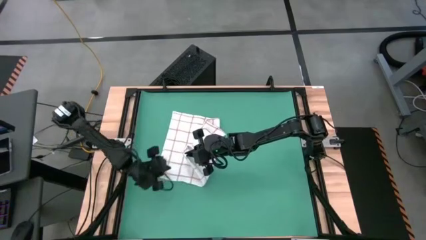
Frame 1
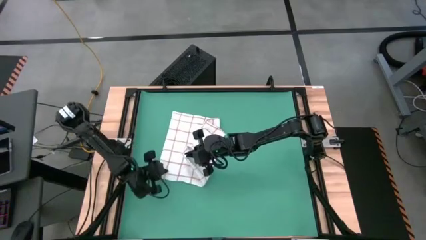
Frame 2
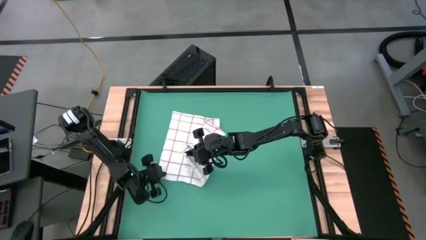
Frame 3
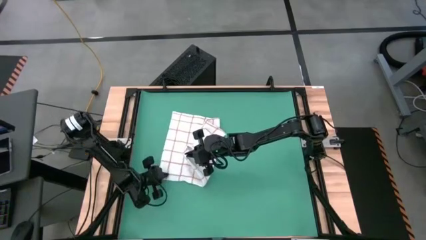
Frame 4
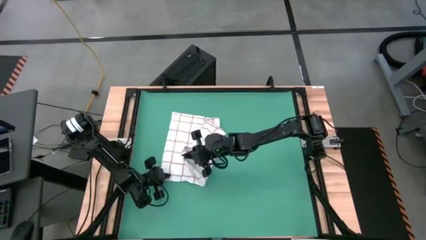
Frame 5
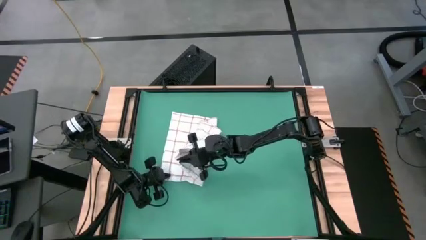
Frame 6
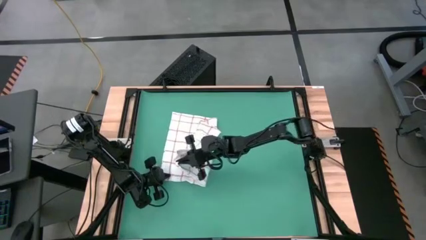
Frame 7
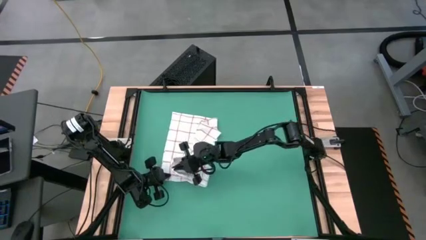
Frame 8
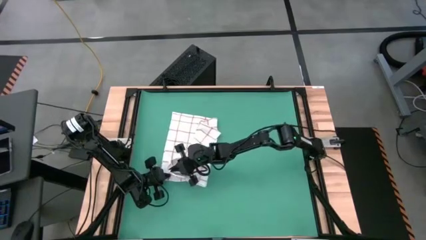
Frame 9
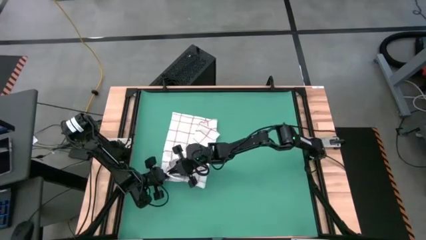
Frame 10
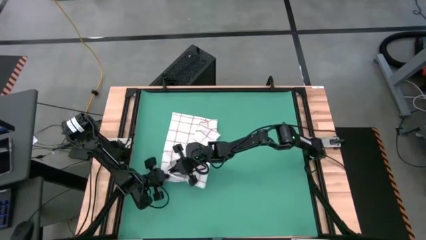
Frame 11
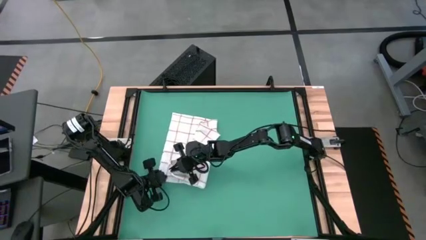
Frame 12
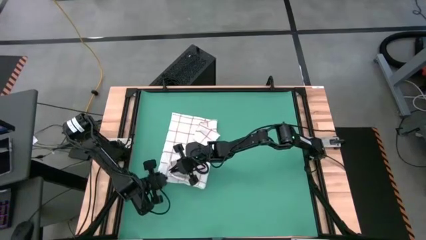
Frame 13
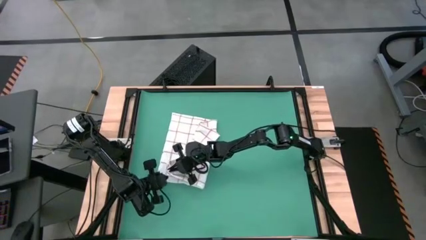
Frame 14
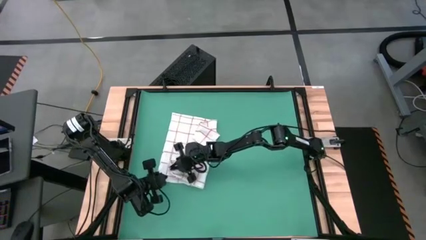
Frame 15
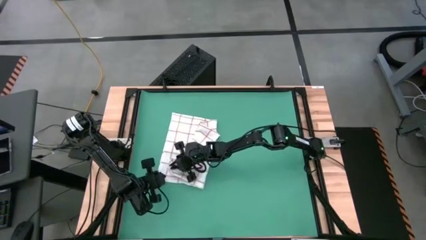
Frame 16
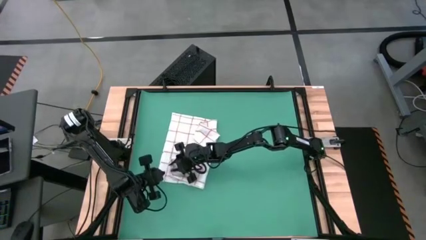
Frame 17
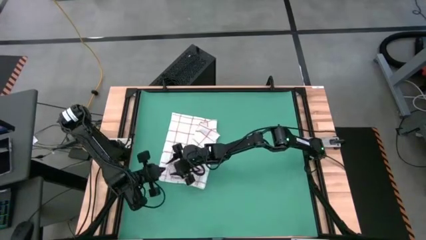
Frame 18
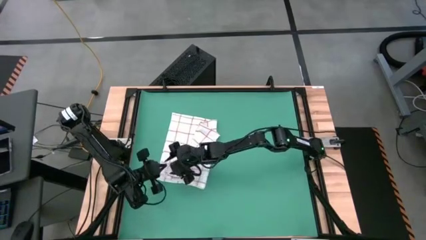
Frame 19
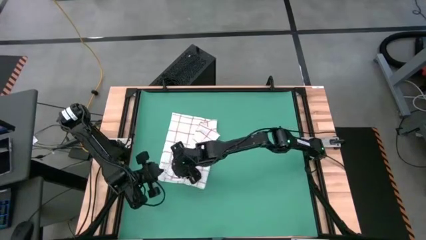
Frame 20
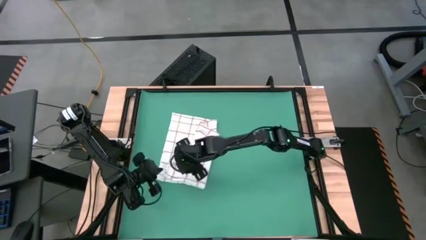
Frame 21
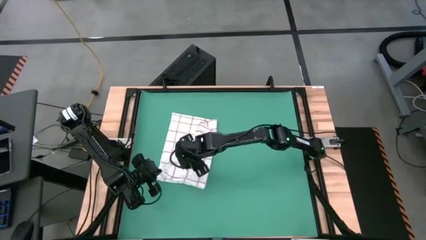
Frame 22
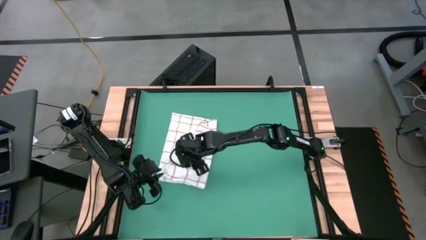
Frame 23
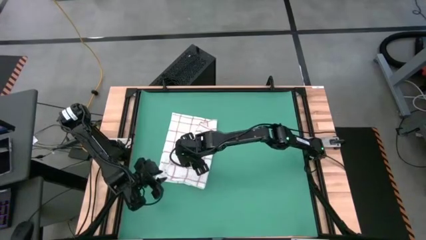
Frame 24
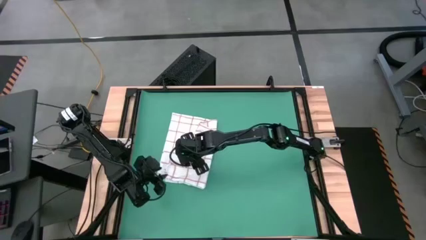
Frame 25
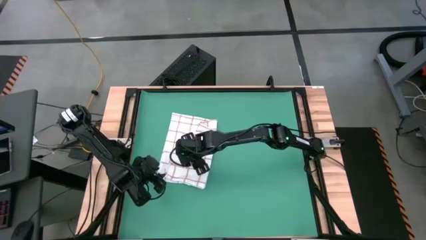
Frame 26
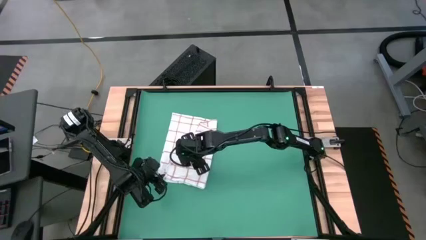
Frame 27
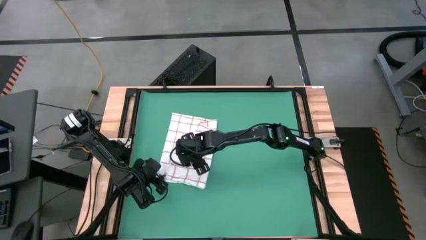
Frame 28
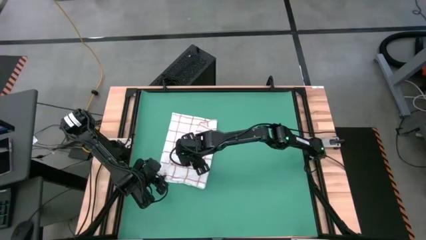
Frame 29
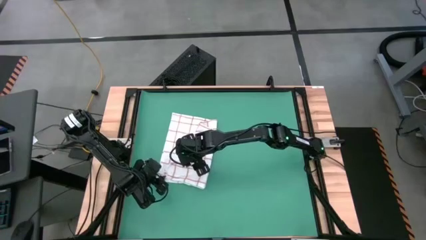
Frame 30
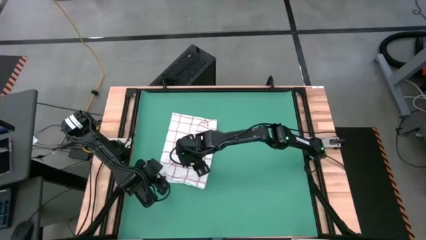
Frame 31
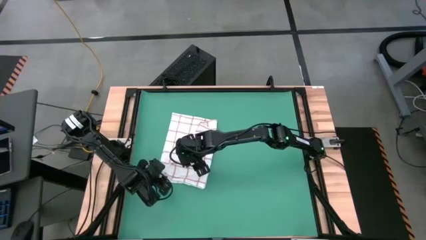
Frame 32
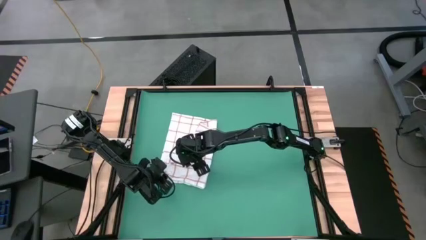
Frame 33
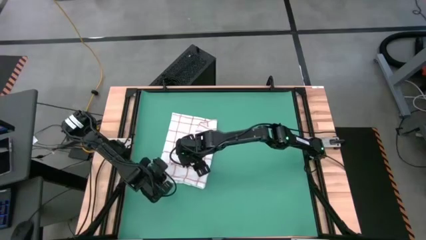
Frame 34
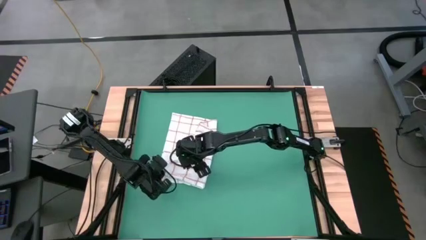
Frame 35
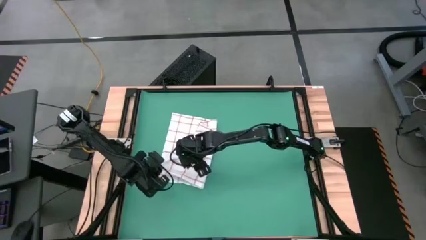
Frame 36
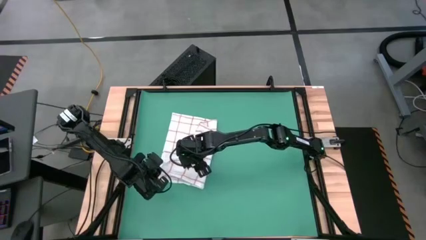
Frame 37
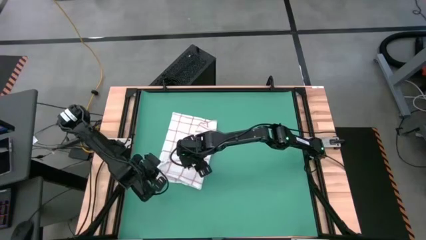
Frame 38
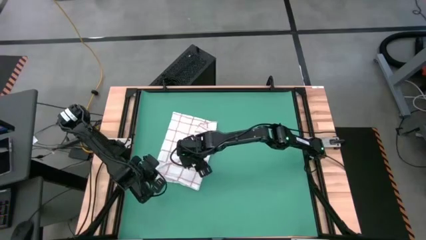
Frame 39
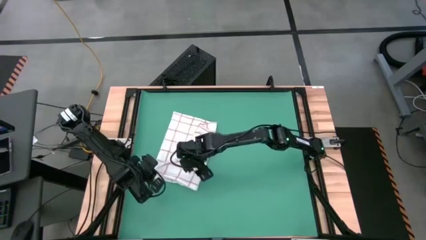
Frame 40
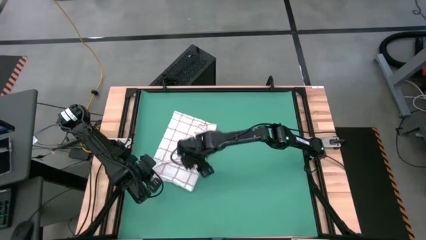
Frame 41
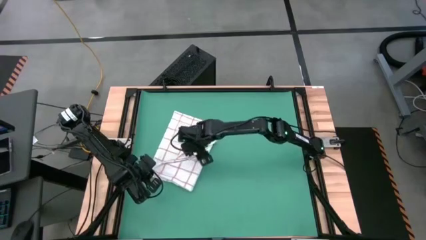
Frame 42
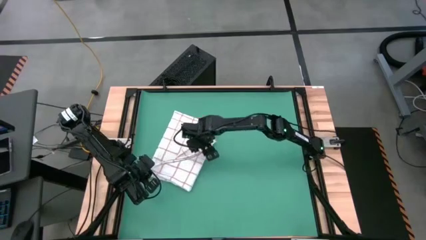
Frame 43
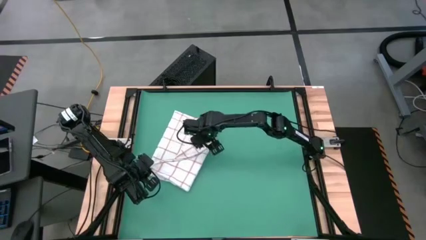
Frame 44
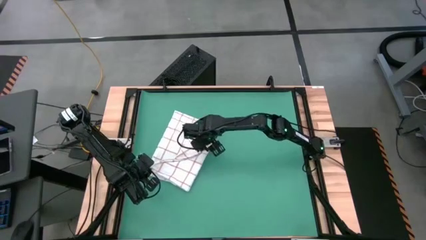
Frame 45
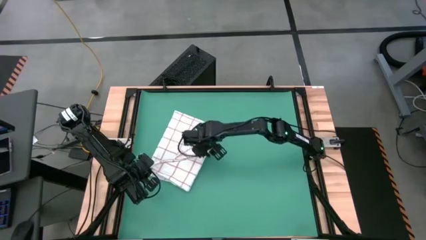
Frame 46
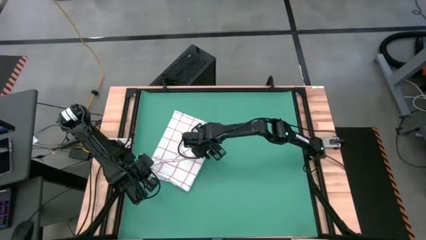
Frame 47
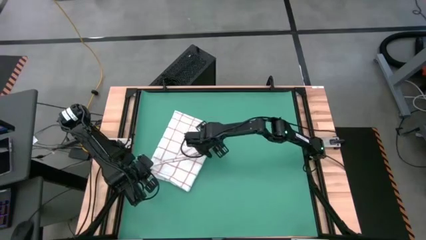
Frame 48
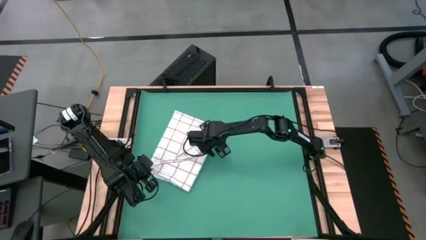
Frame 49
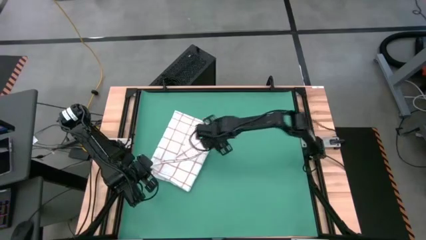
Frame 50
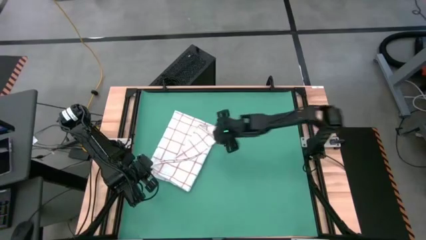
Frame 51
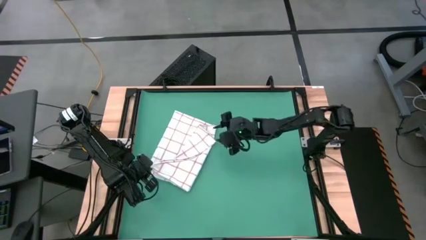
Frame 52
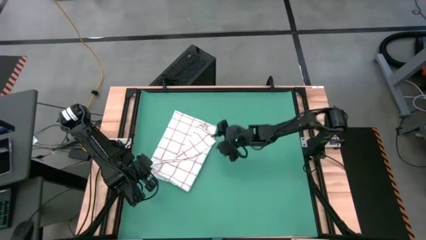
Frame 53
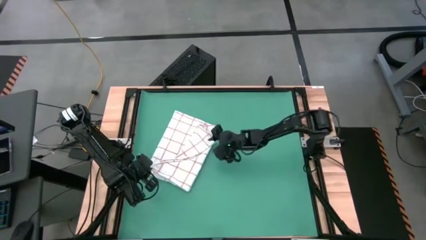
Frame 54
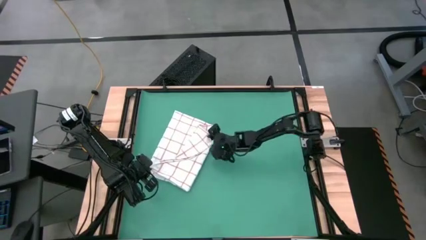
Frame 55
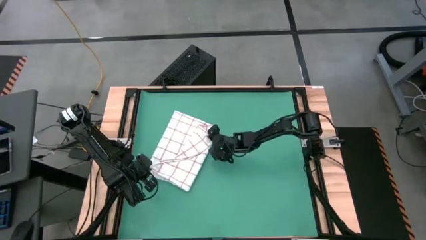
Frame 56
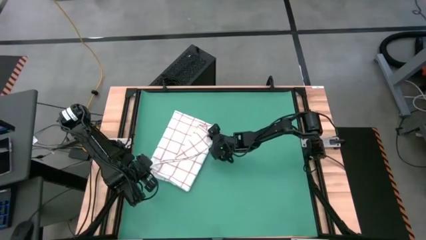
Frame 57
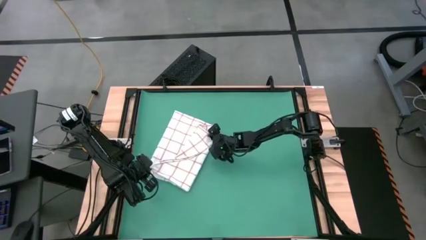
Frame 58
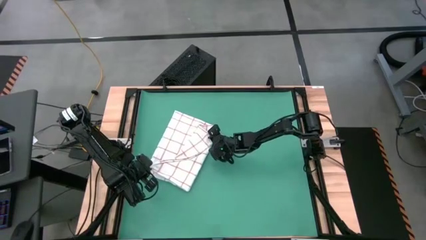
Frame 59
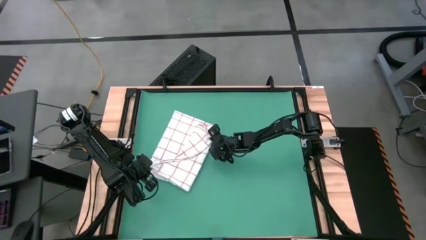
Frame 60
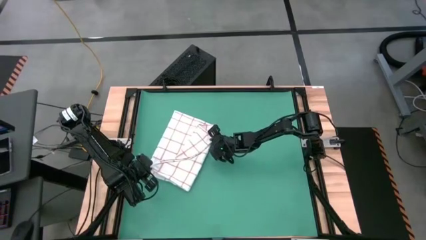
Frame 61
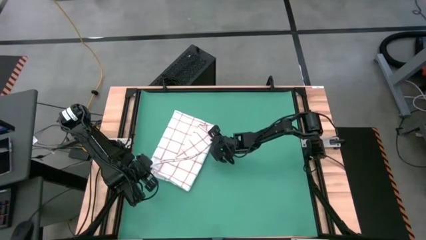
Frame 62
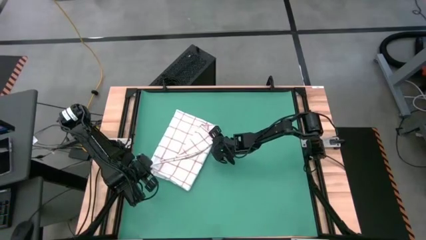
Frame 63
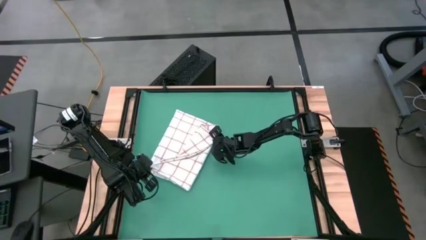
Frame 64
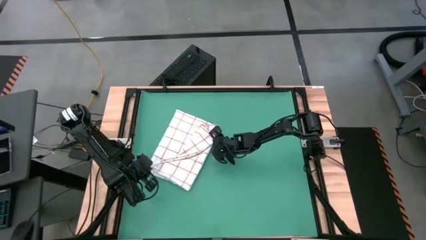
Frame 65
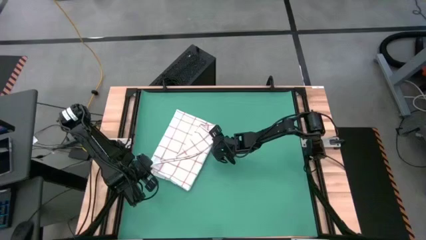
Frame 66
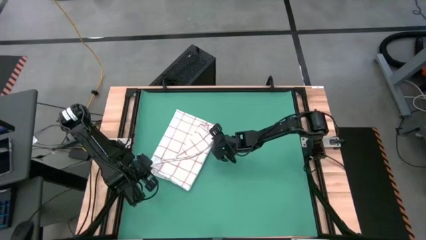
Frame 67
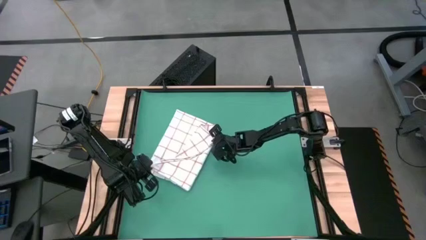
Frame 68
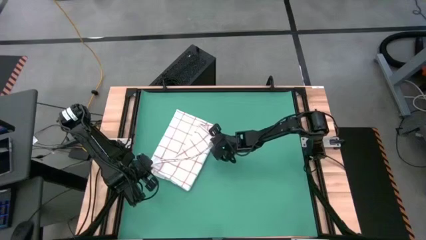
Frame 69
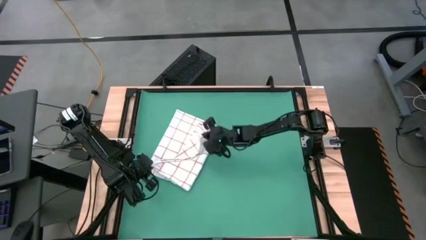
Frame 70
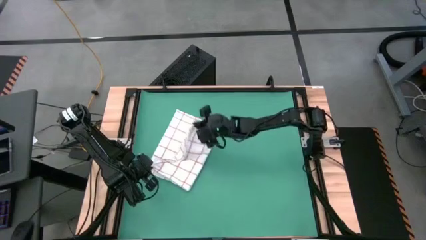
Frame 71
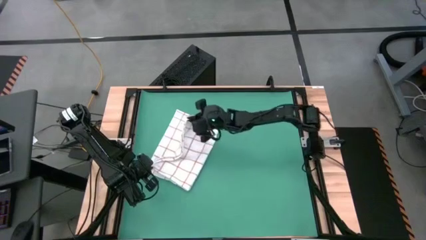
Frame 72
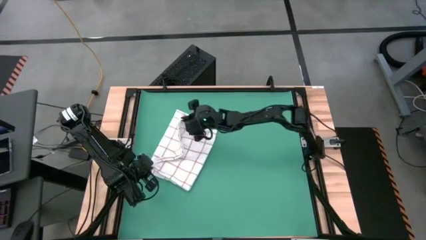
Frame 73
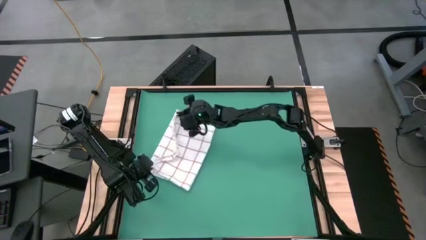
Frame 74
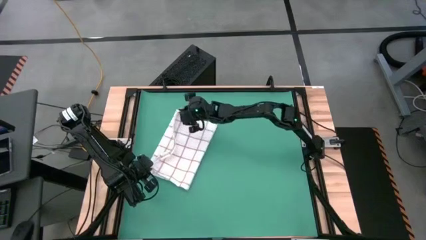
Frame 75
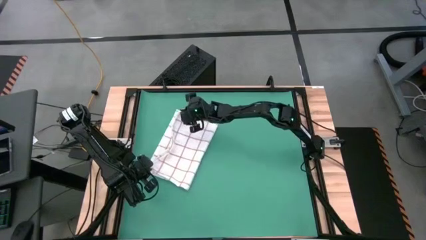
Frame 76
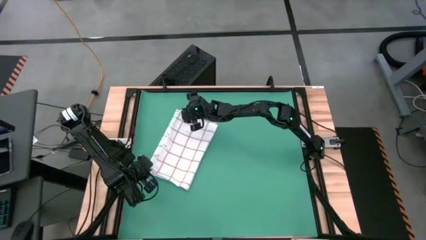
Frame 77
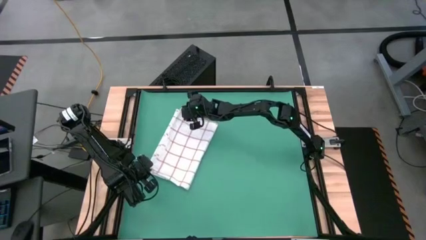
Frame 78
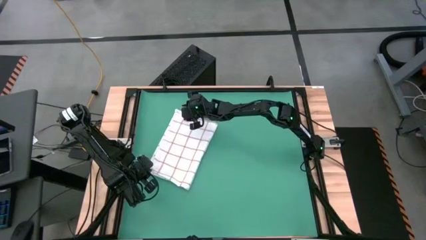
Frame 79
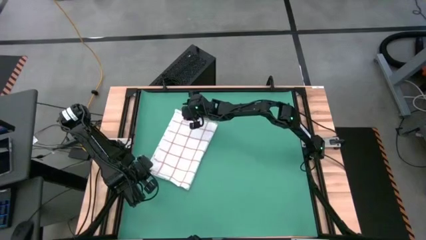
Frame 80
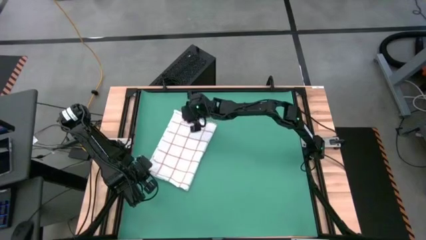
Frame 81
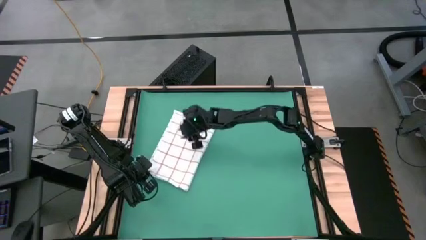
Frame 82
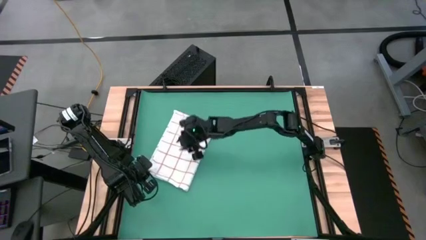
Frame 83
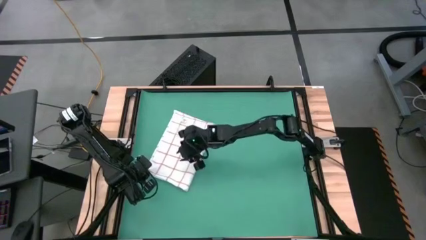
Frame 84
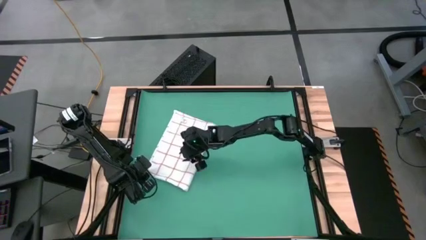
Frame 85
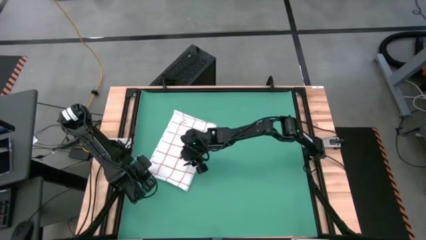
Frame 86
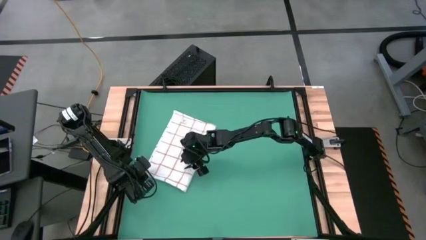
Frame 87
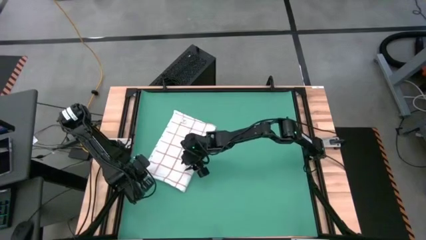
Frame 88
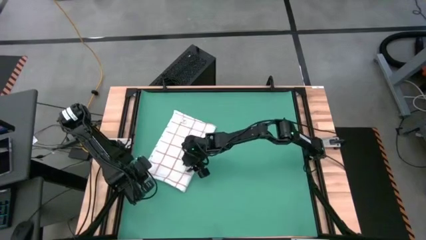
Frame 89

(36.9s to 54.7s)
Task: Roll towel
Fold the white towel
